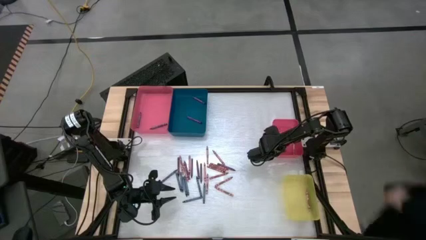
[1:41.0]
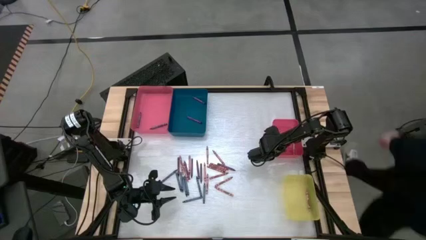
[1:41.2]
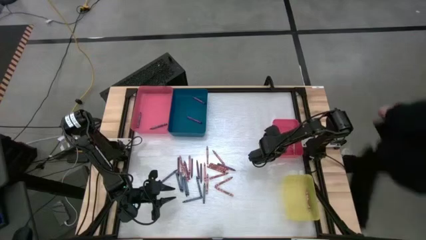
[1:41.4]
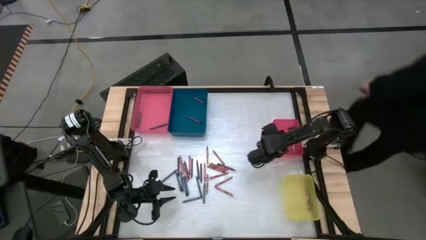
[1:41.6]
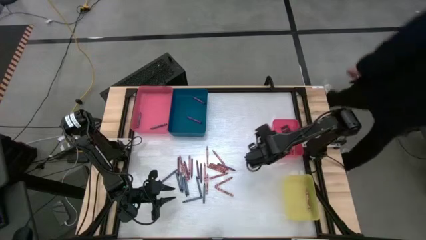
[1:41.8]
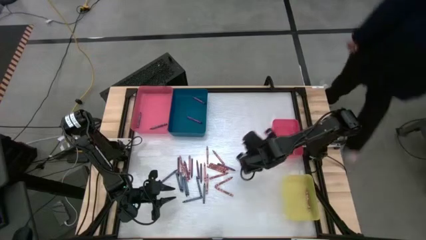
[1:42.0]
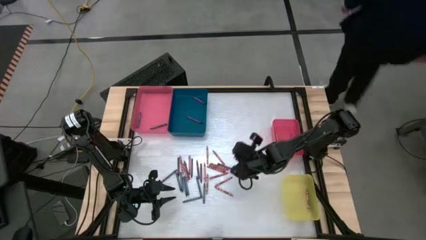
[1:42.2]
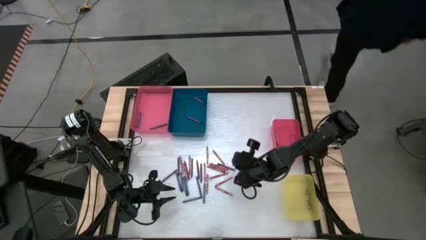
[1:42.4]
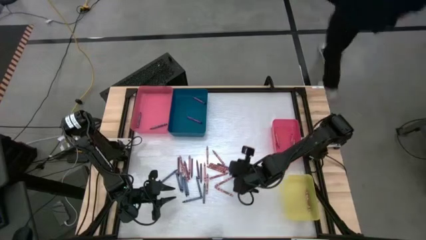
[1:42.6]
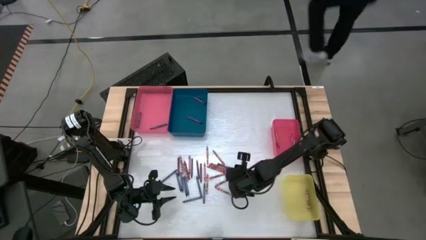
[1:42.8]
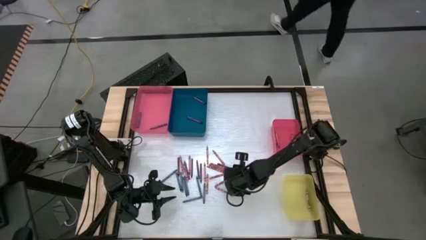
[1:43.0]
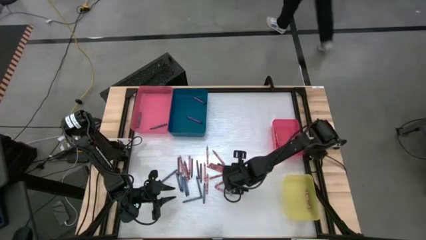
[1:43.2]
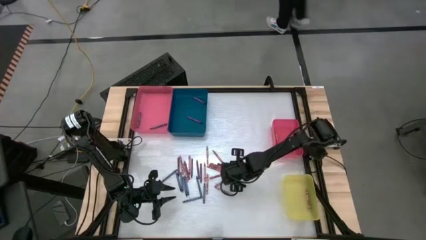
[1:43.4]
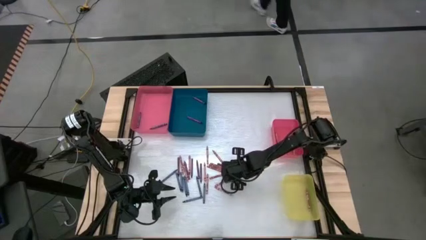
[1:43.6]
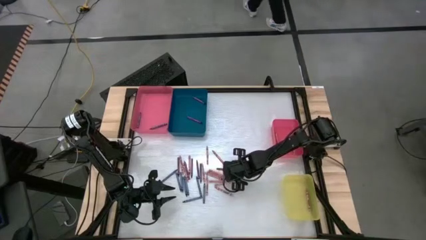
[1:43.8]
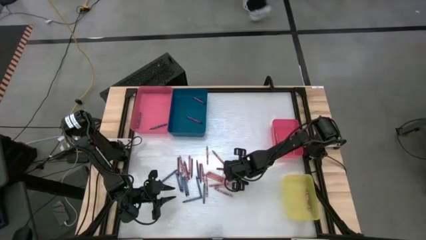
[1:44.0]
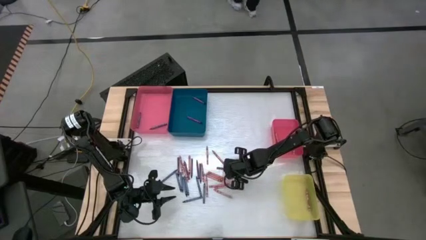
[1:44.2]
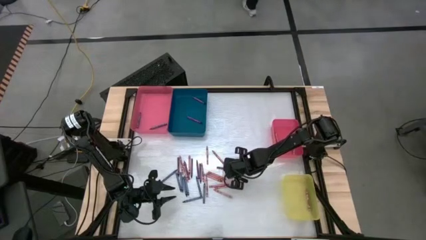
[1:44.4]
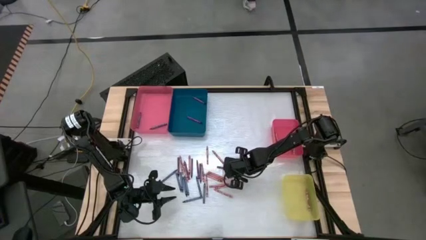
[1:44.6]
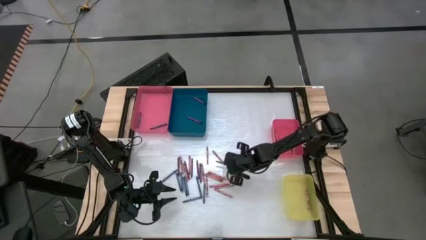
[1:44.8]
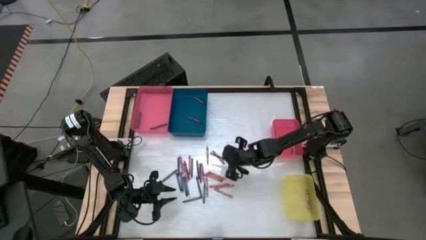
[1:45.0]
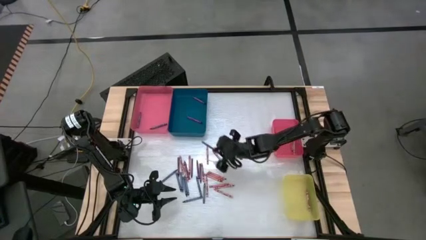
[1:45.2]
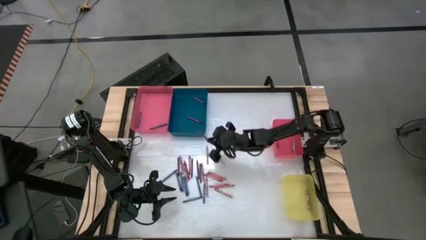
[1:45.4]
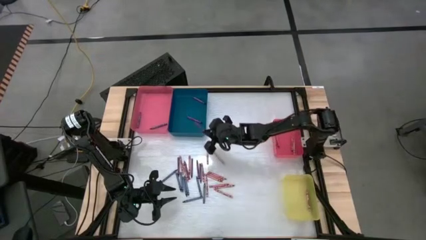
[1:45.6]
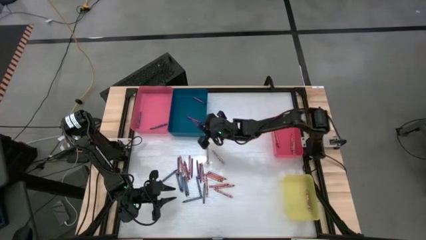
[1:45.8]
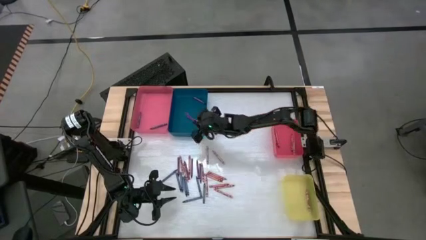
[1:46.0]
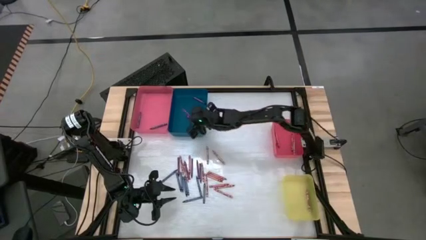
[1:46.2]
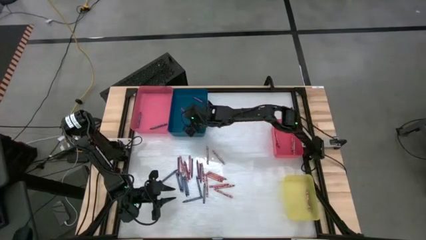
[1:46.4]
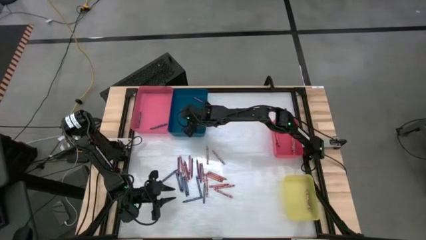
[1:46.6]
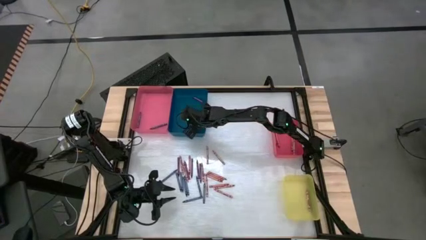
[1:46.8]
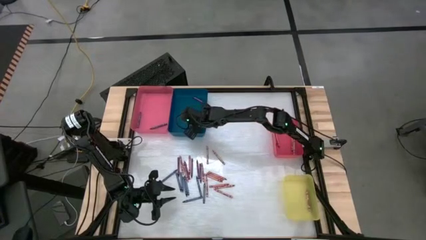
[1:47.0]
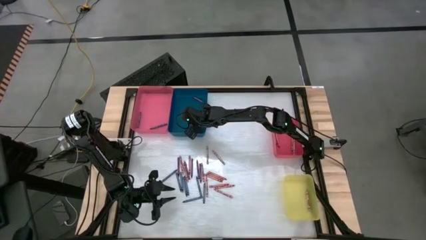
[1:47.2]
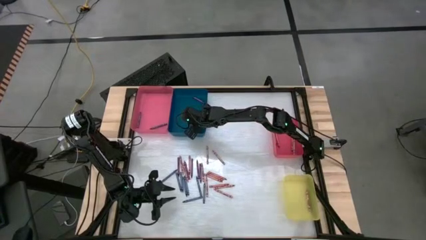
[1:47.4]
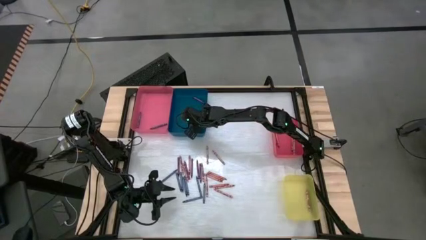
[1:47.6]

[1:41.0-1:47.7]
Task: Sort crayons
Put the purple crayon into the blue bin

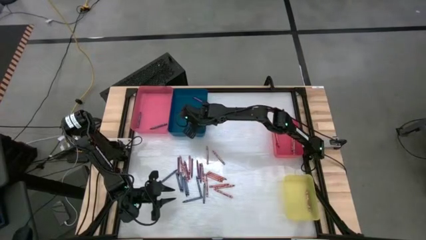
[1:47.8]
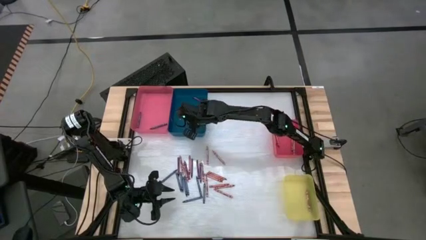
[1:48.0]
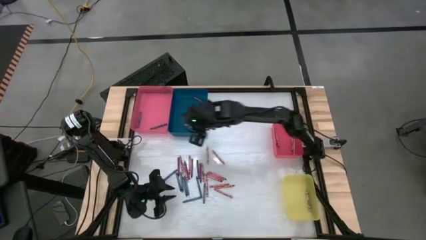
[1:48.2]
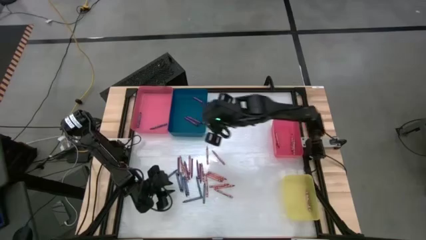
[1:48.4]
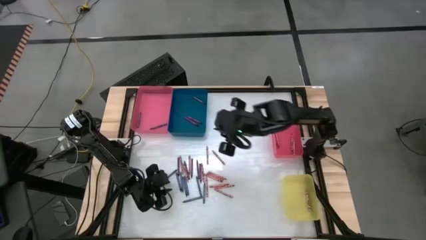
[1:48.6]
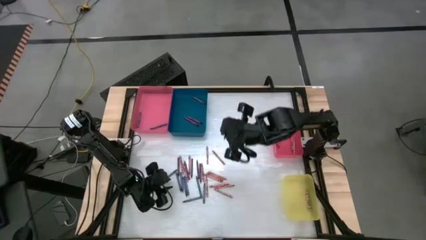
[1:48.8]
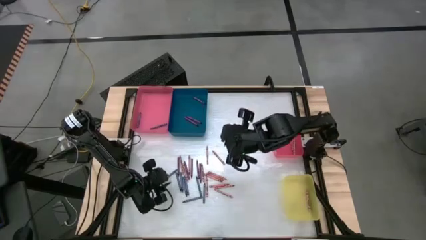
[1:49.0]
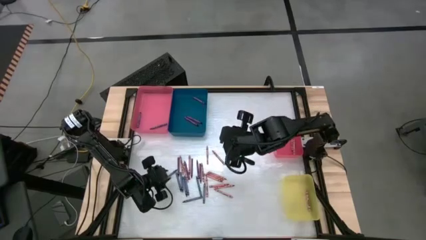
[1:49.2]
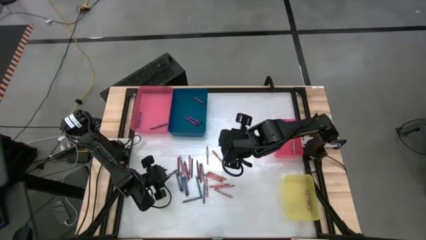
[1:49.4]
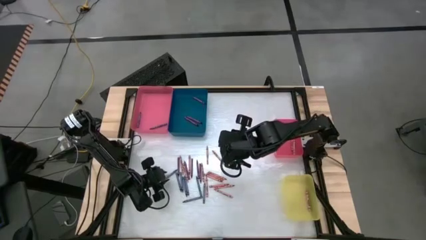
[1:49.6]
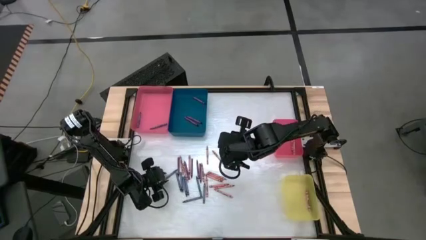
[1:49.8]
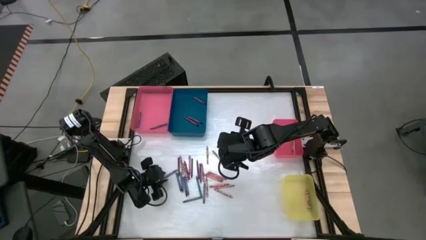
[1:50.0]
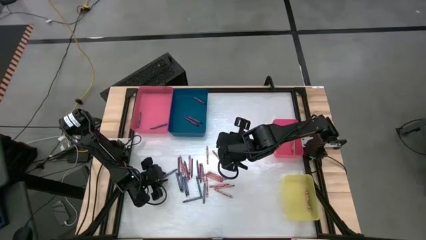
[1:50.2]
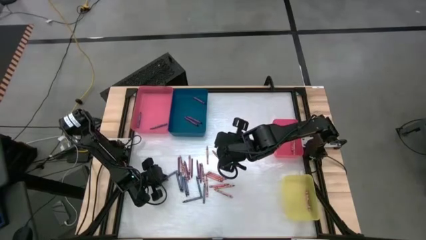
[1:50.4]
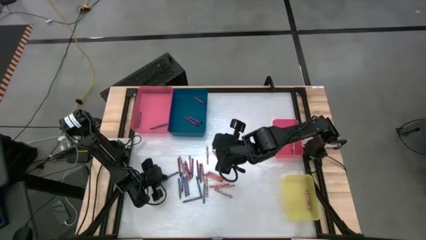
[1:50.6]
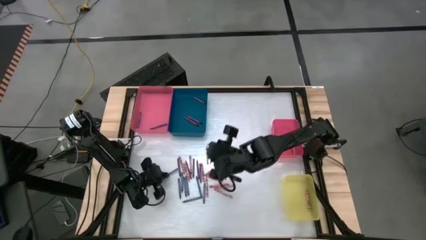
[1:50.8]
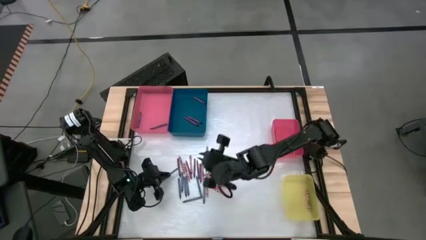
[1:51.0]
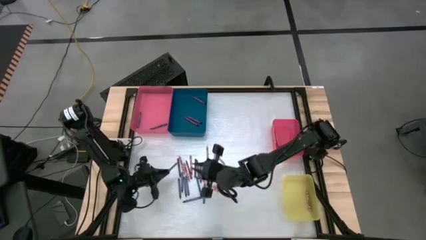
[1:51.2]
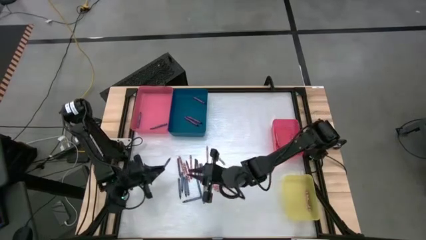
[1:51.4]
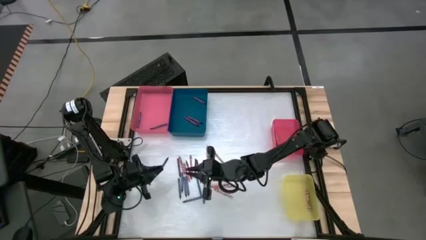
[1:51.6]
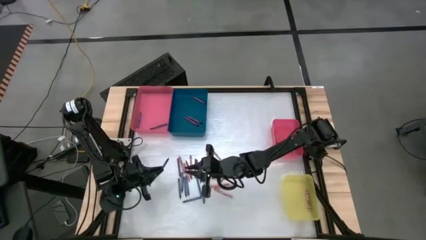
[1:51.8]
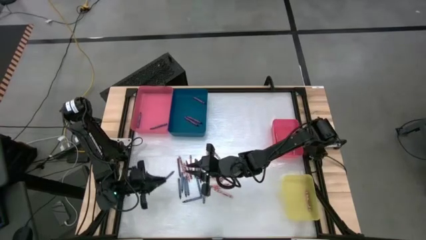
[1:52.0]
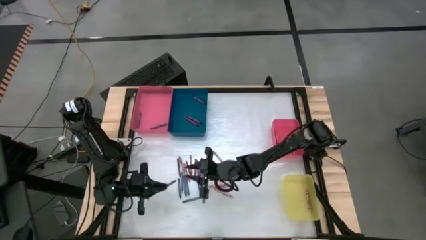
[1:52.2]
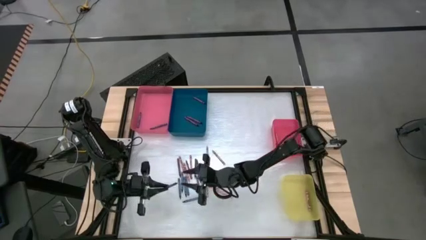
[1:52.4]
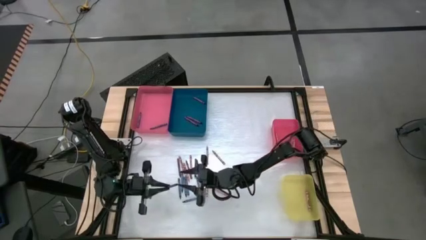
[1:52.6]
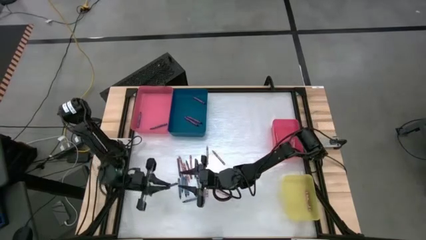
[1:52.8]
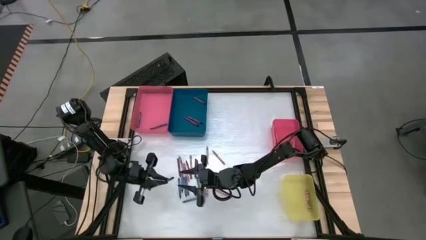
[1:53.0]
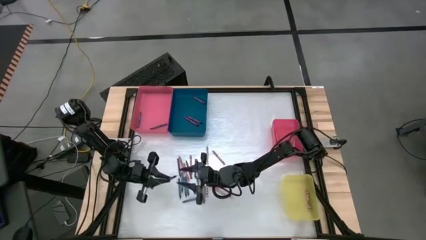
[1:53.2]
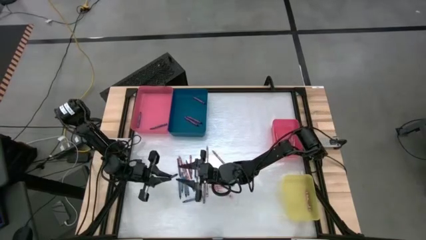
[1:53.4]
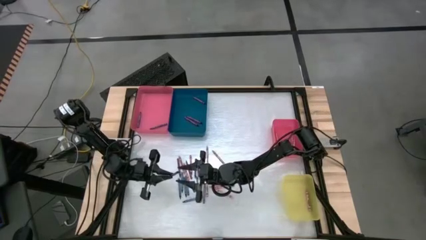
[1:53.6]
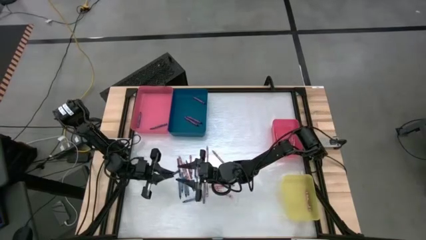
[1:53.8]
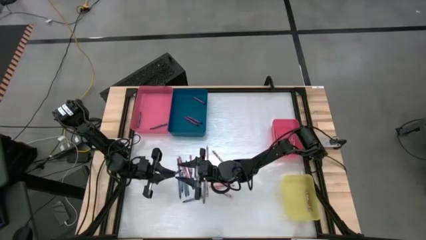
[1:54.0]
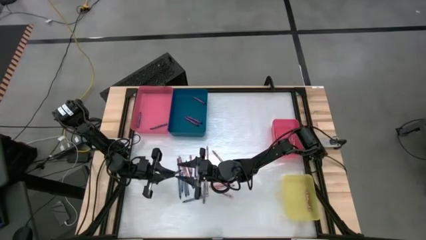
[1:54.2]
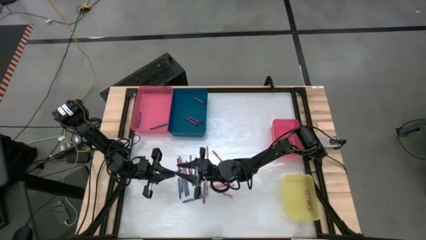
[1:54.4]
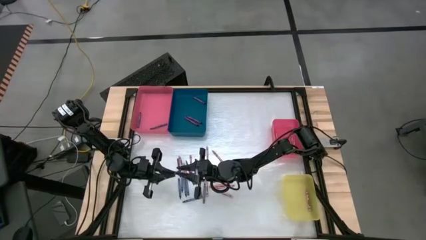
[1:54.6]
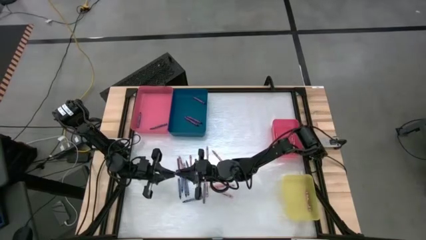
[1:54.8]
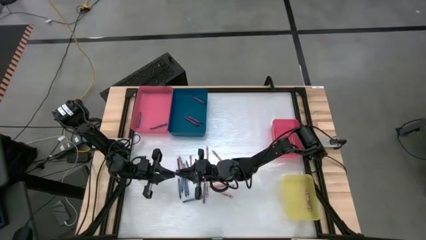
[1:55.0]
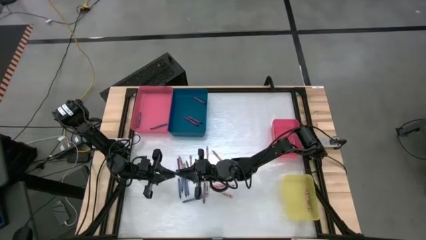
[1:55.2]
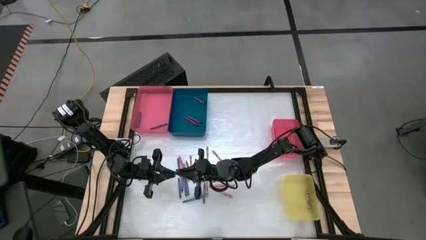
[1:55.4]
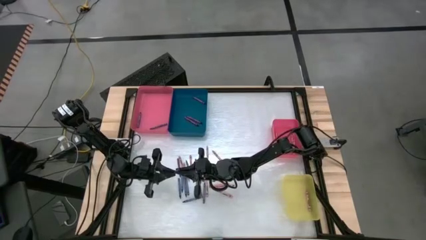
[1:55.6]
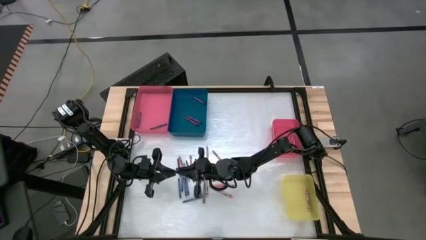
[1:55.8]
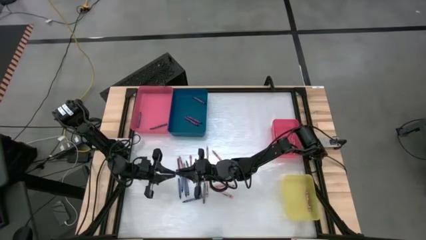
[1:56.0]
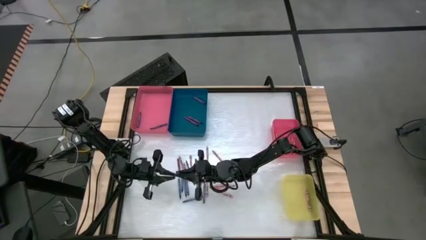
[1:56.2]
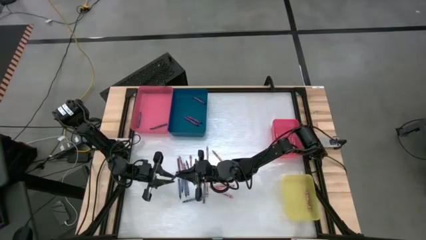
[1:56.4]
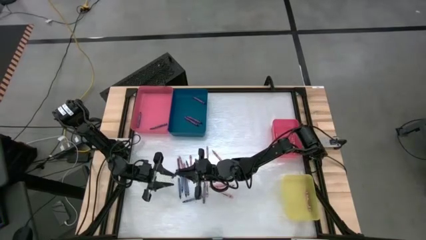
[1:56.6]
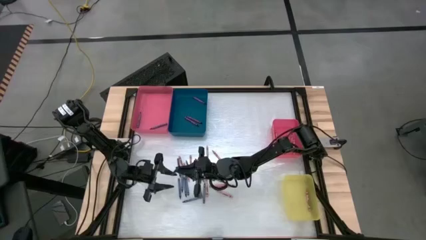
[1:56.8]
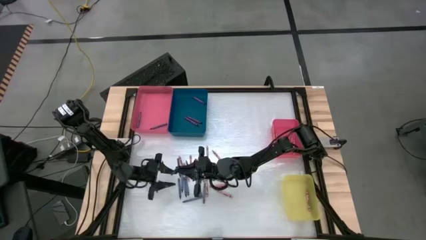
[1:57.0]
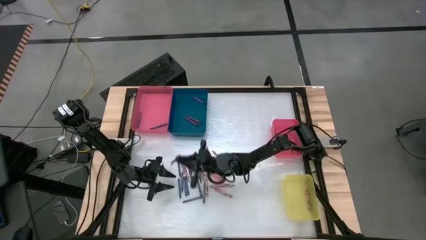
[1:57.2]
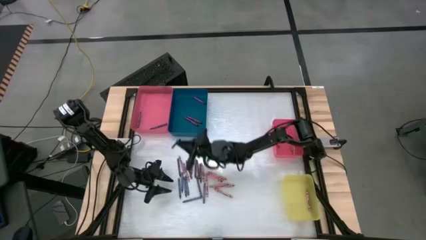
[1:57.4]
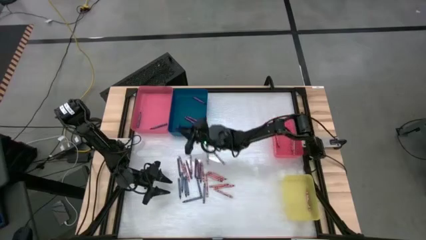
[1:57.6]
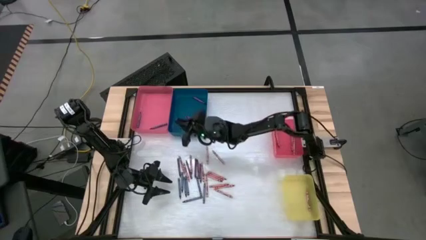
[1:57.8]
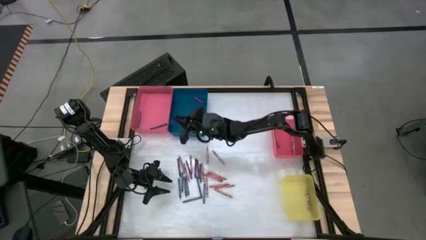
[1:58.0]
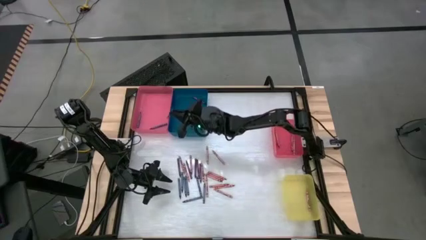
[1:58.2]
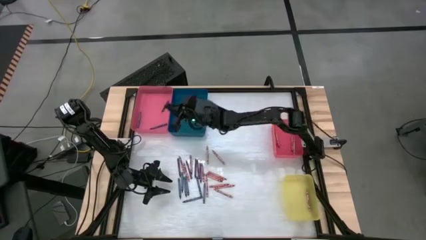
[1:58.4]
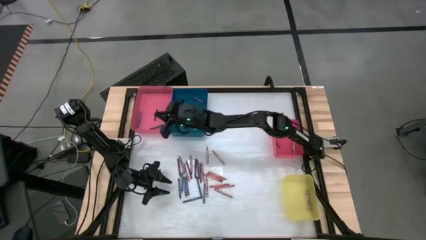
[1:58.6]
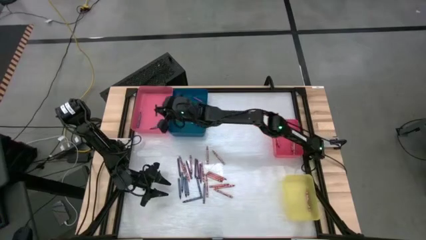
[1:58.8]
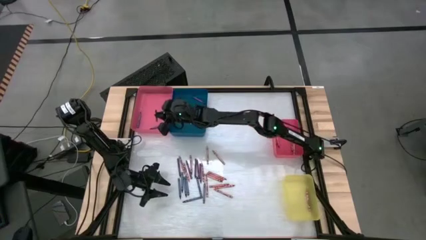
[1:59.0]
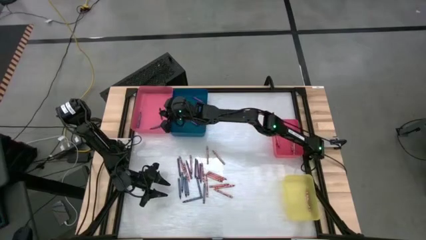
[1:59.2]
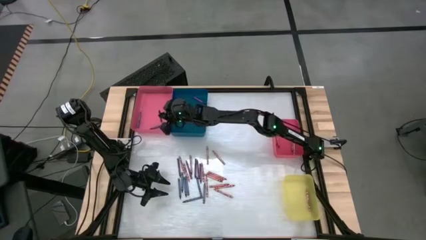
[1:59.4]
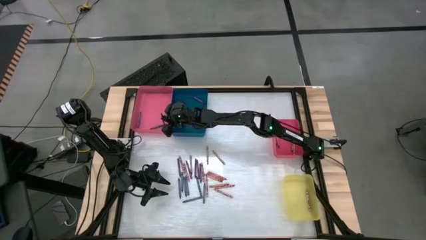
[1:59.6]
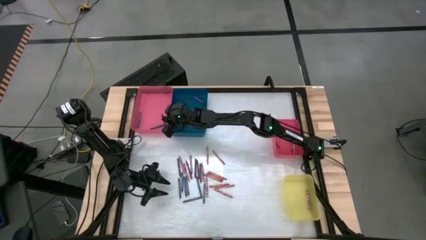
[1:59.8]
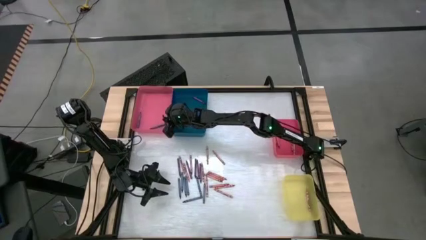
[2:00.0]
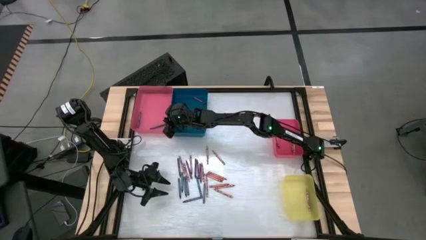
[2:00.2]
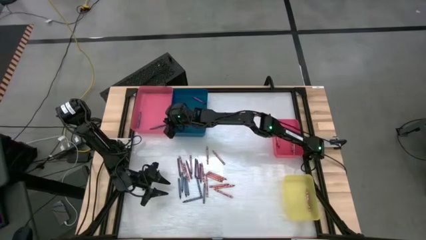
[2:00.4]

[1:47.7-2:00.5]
Put the blue crayon into the large red bin
